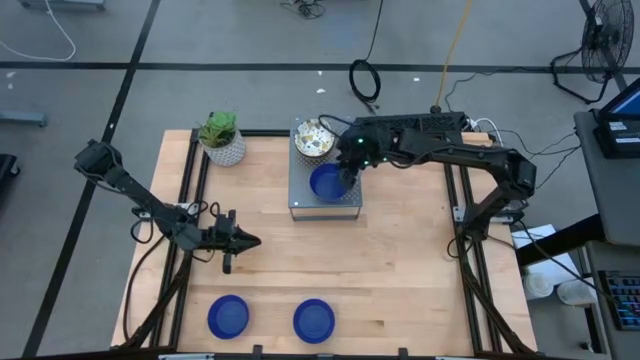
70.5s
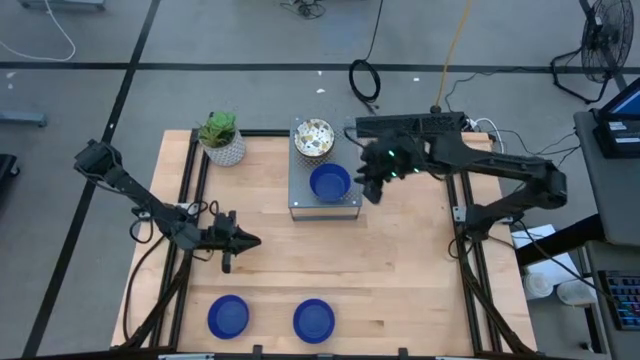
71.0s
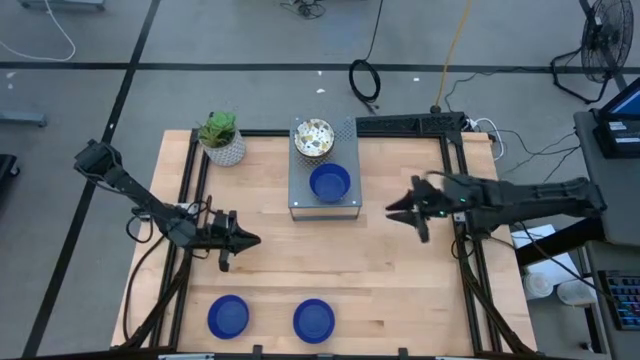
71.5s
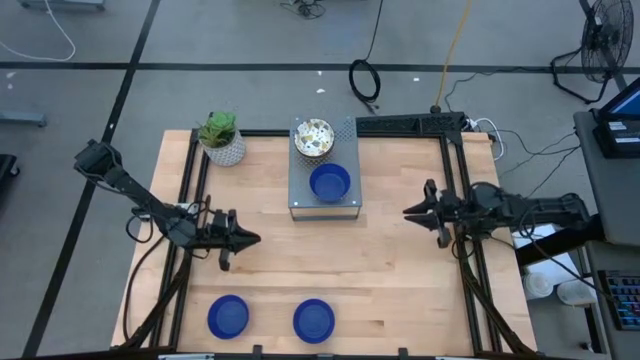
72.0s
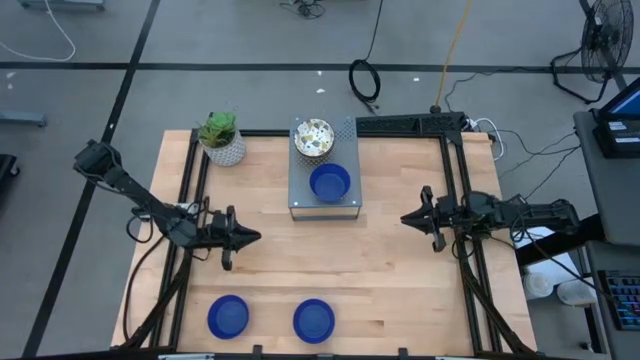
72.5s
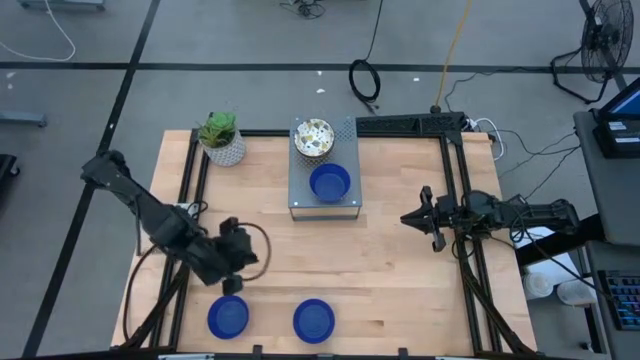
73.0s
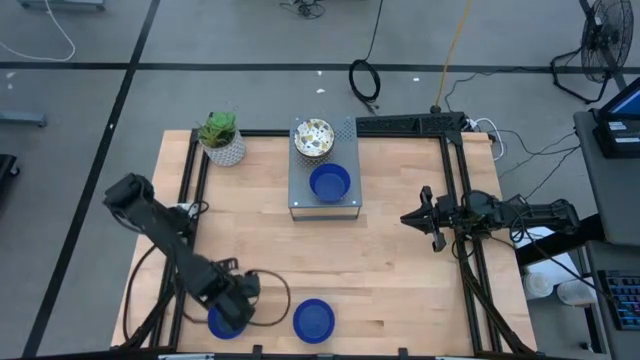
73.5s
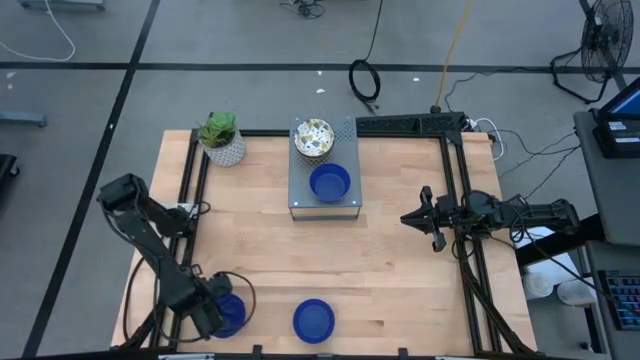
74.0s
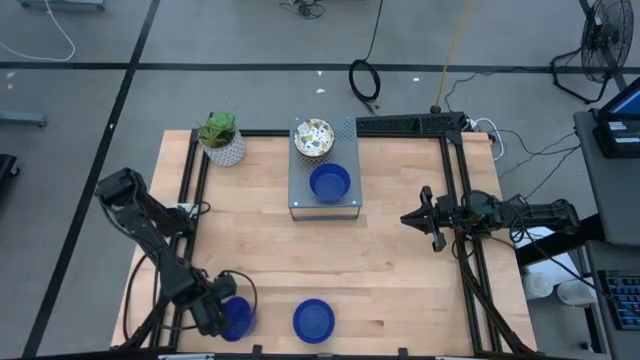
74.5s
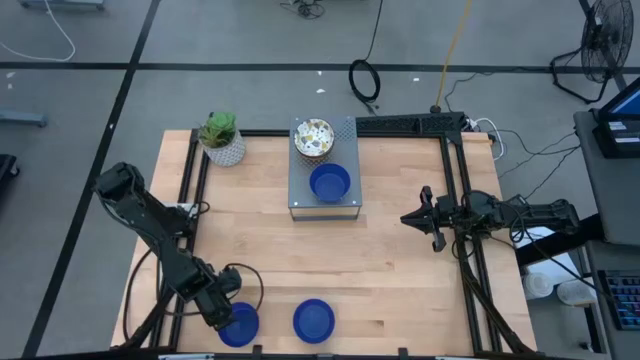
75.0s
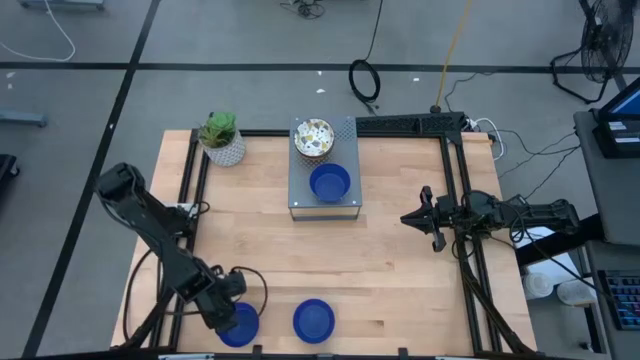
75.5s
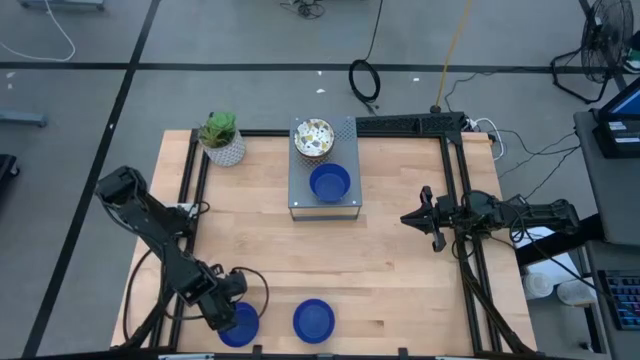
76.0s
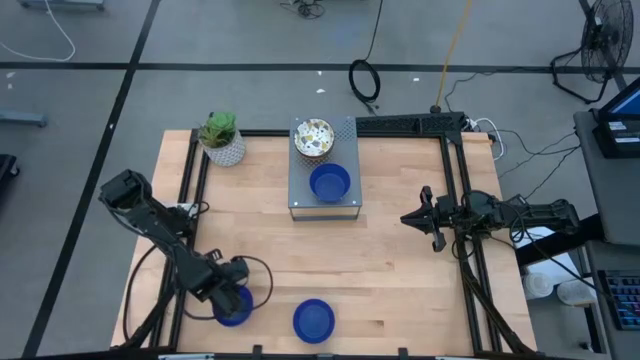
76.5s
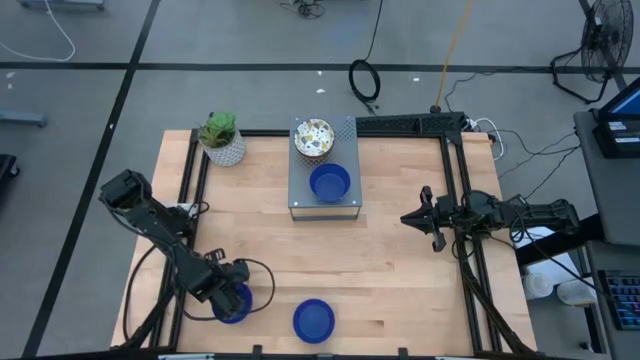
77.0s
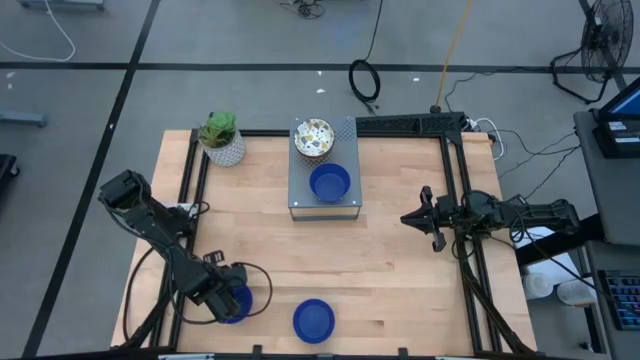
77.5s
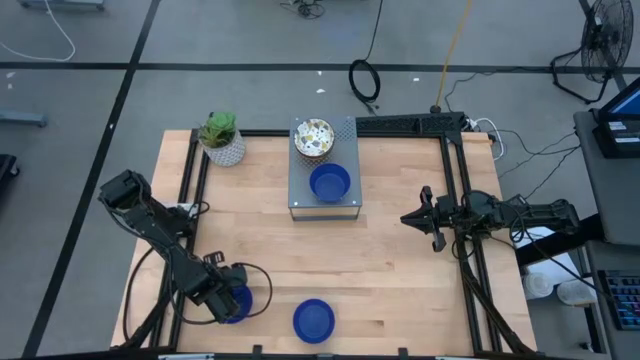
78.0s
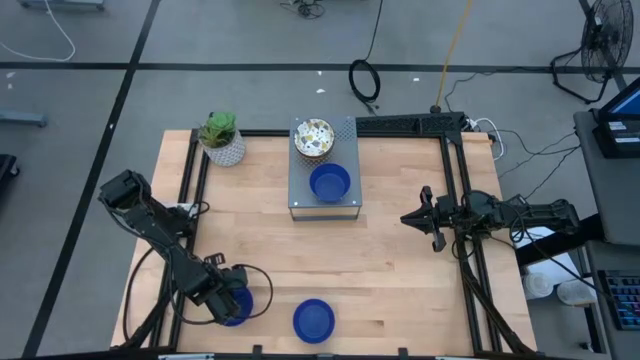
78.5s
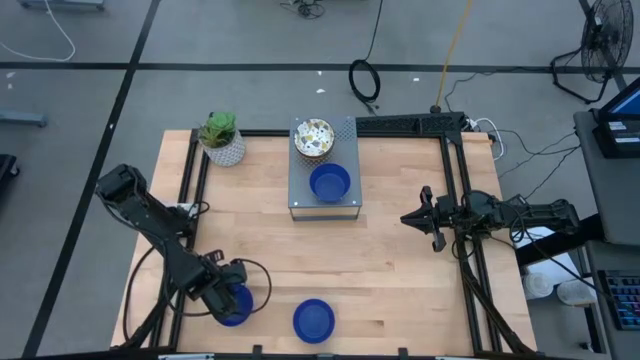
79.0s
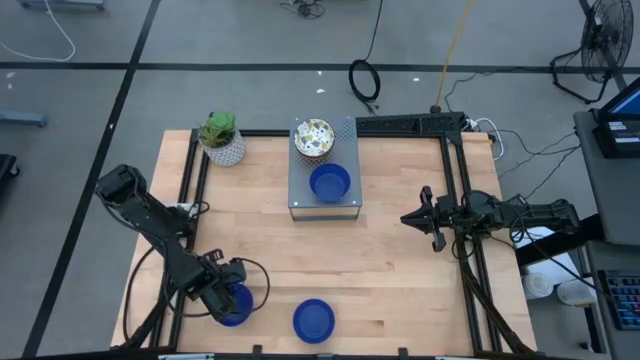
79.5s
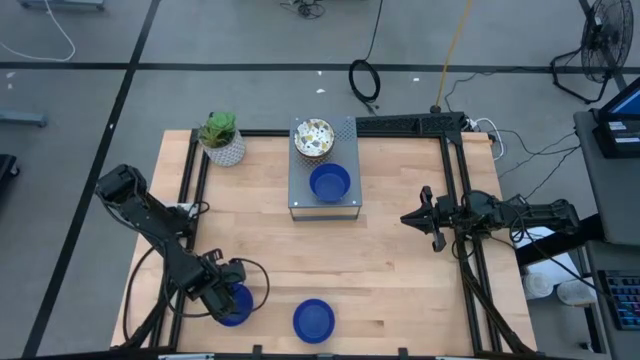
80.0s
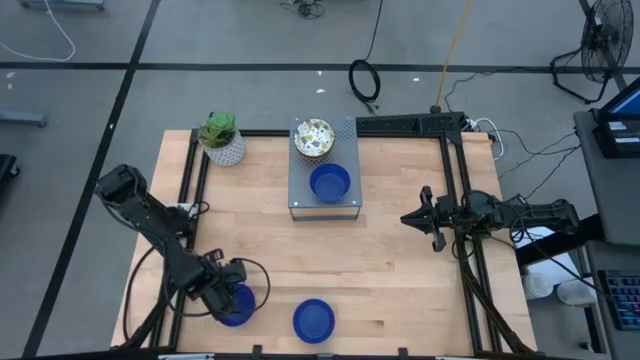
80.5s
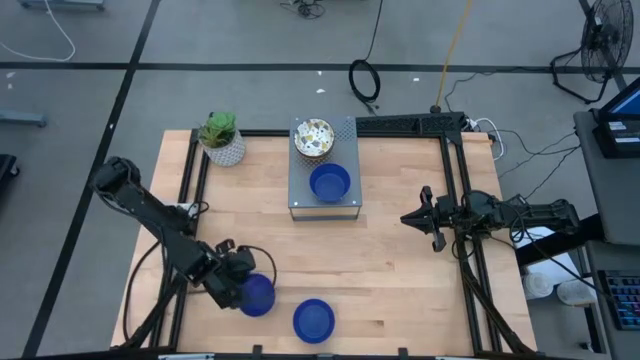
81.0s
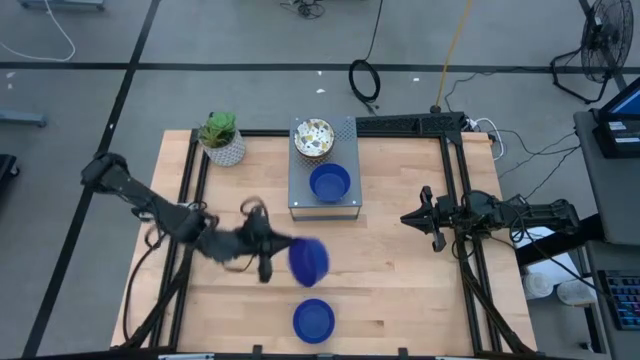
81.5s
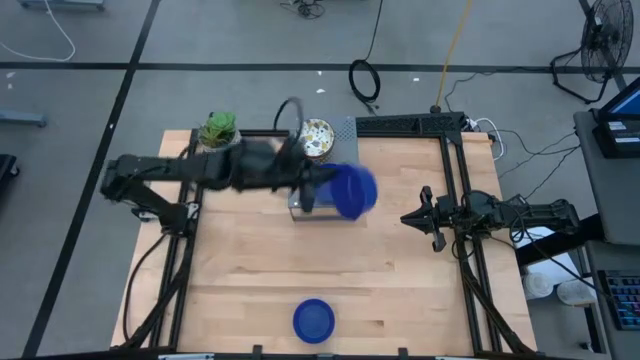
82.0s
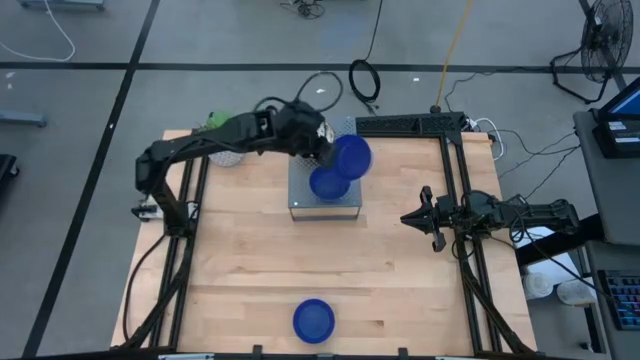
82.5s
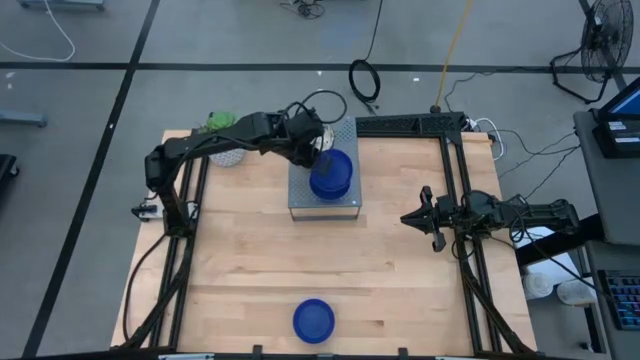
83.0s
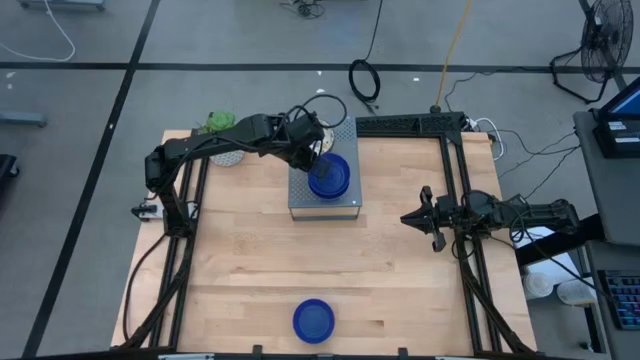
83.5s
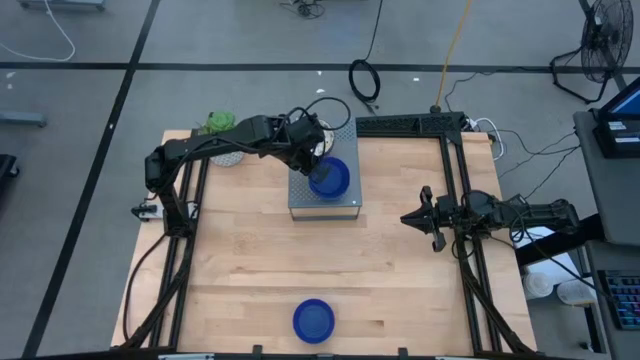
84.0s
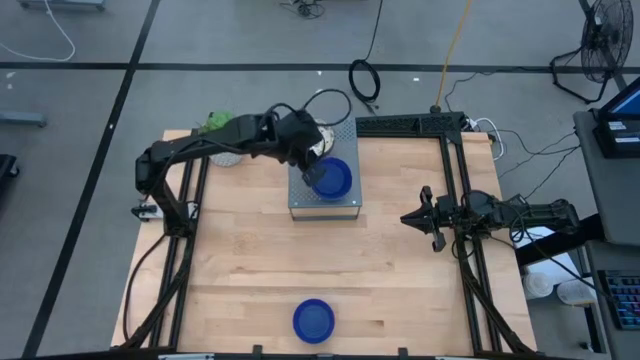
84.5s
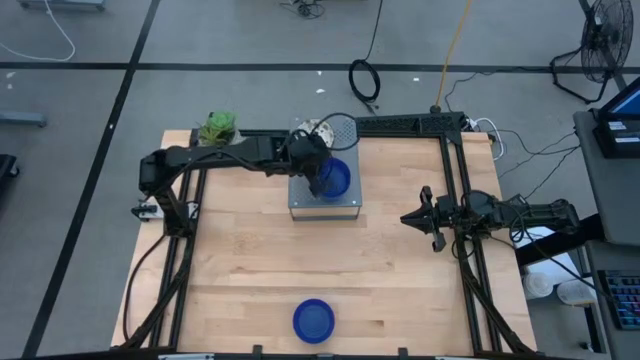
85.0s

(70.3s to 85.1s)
Task: Pick & Place Mini bowls
Stack the left blue bowl on the blue bowl on the shelf

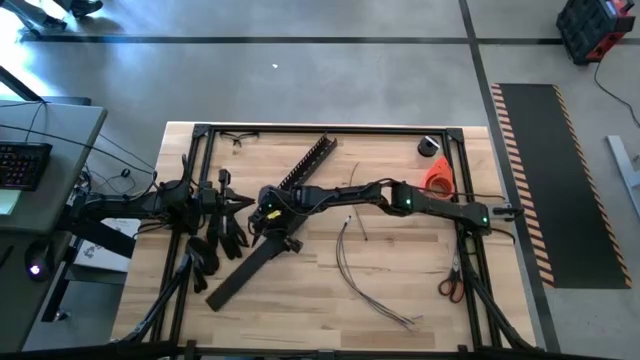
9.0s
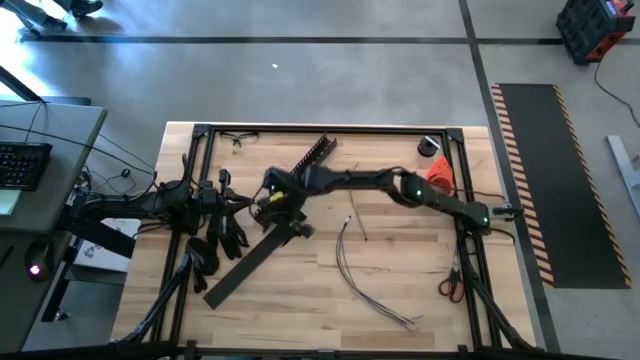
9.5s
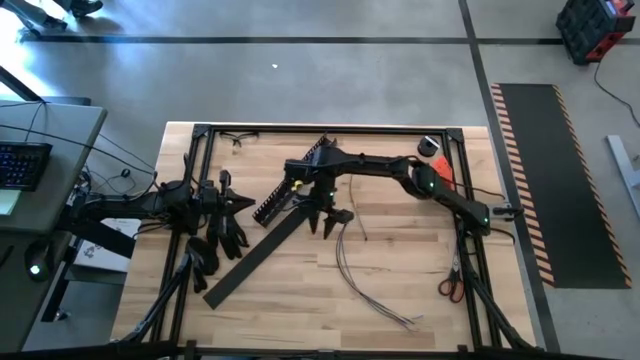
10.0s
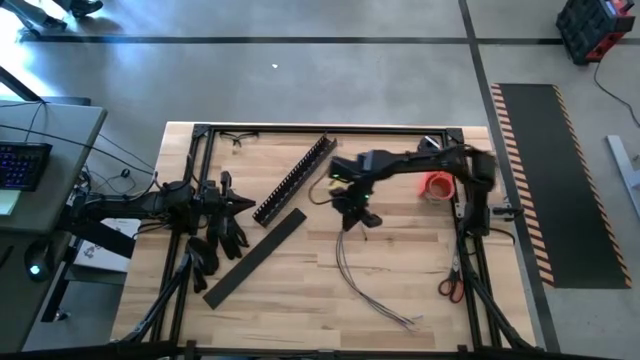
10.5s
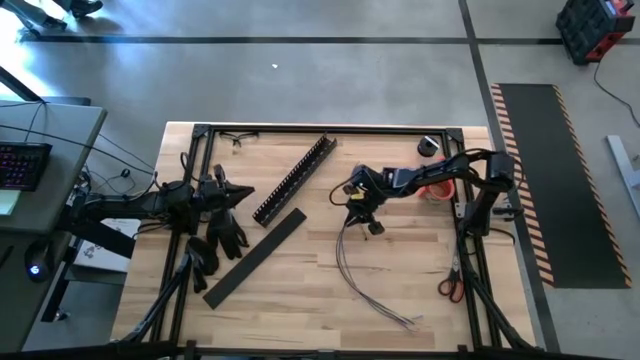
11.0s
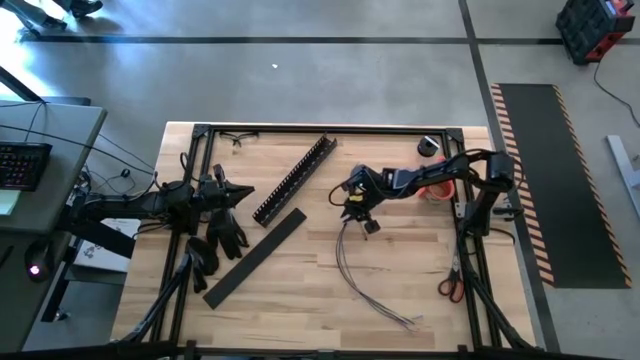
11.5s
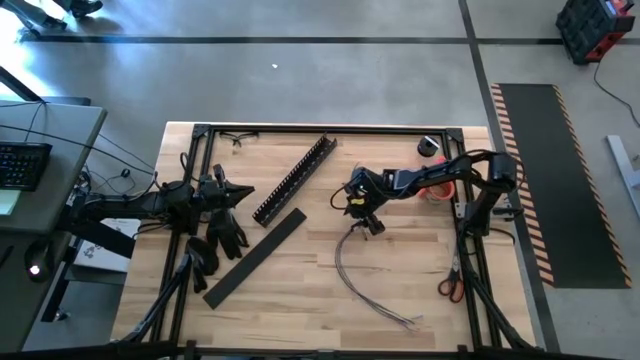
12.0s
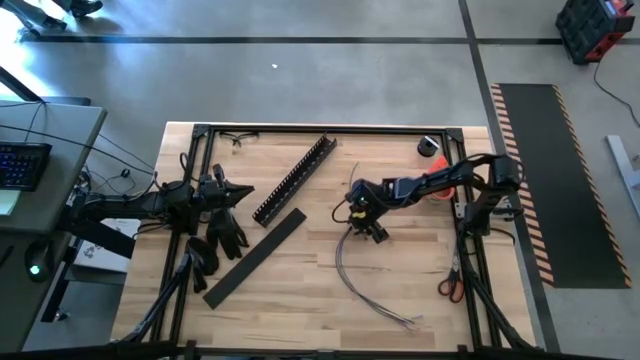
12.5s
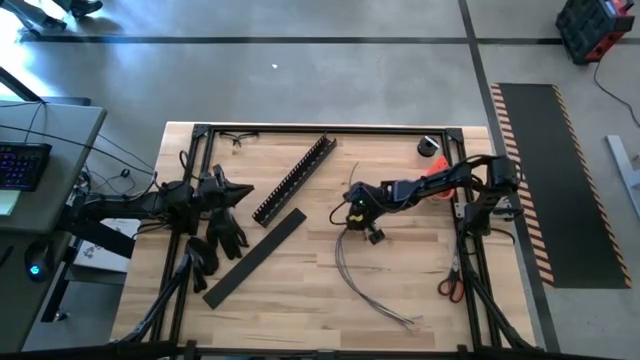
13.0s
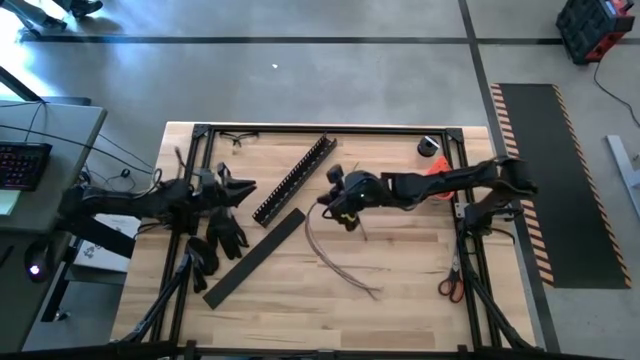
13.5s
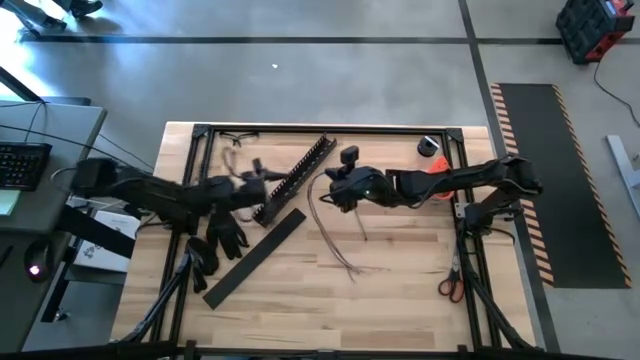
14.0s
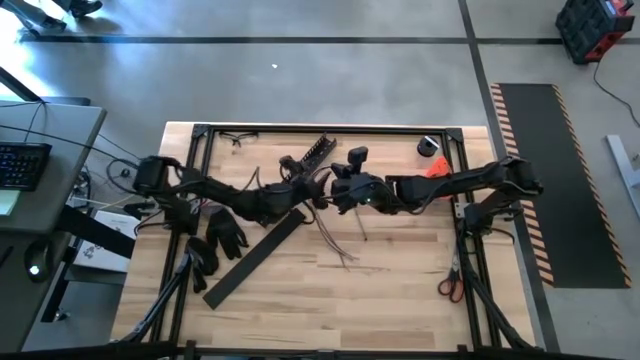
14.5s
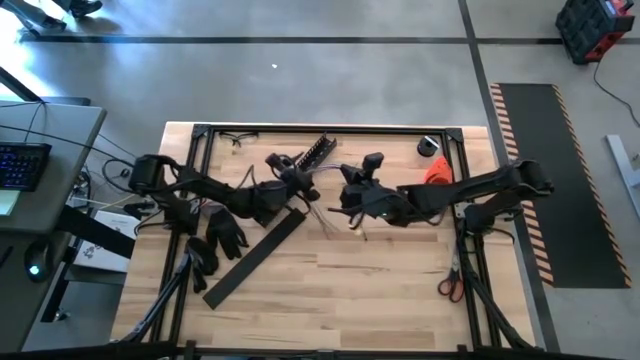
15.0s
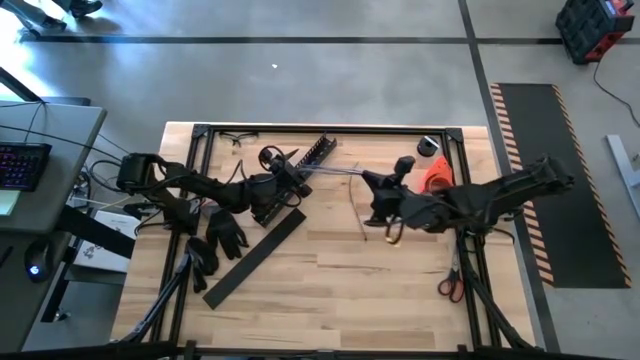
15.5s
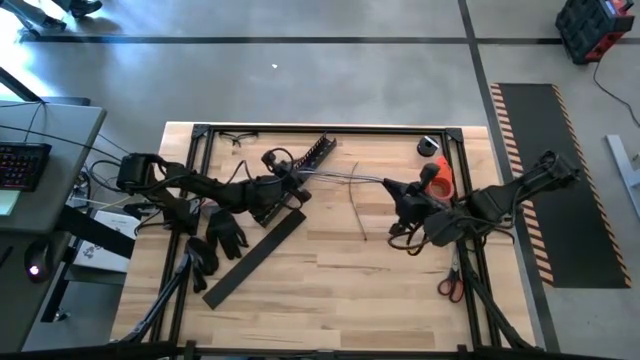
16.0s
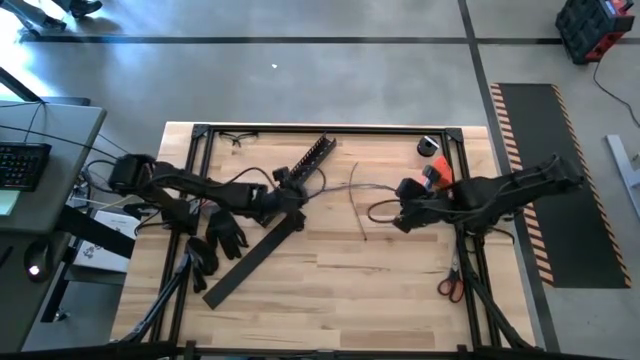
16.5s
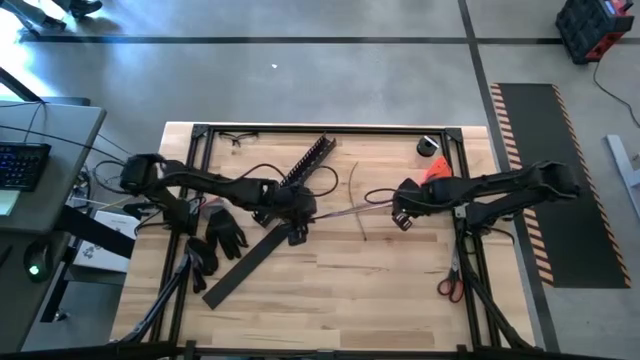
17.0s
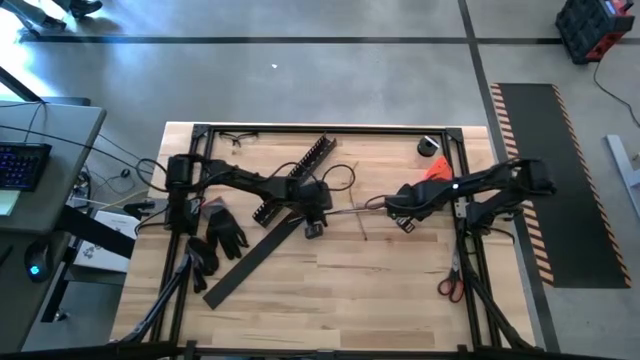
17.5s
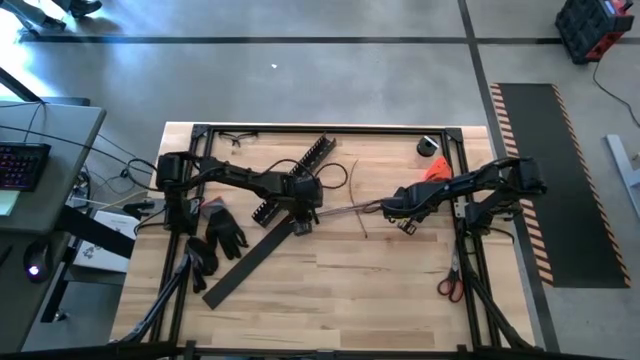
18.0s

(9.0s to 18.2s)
Task: Ziptie cables
Wrap the cables together using the black zip tie
